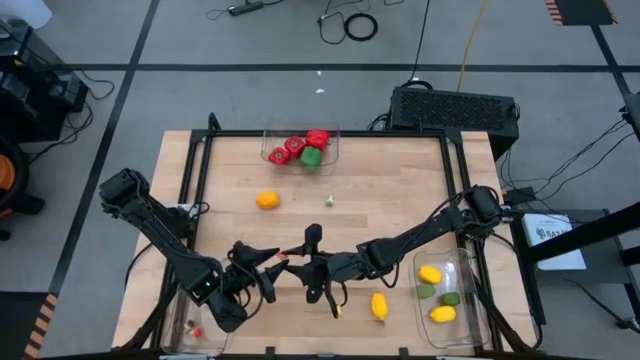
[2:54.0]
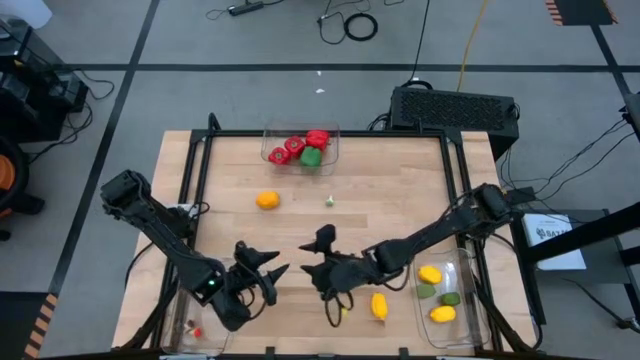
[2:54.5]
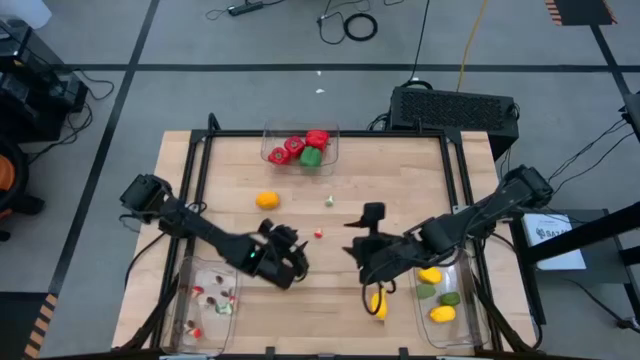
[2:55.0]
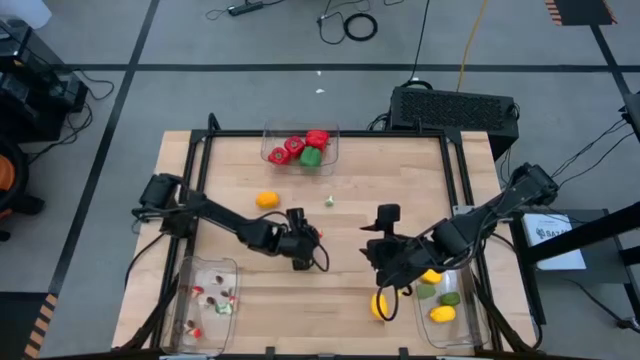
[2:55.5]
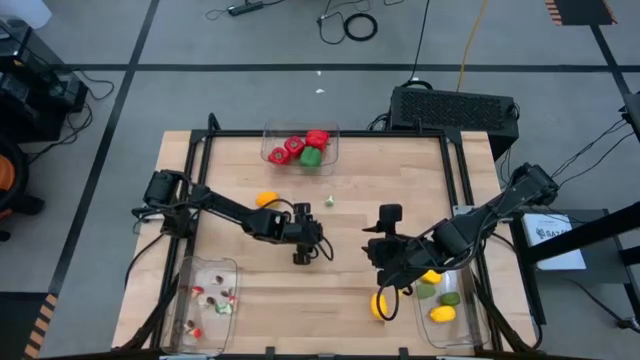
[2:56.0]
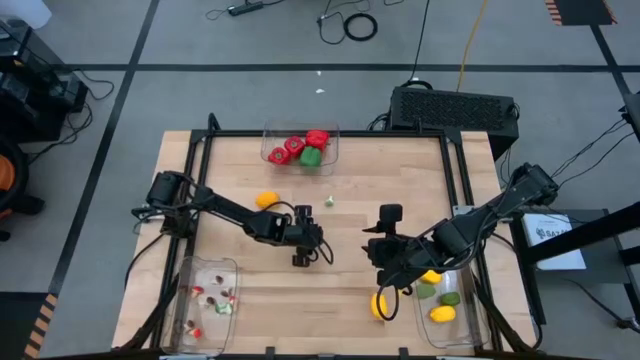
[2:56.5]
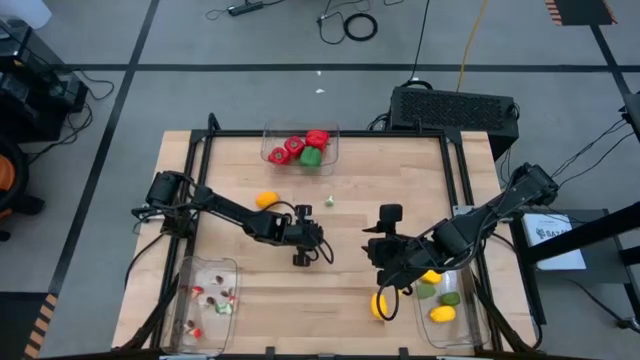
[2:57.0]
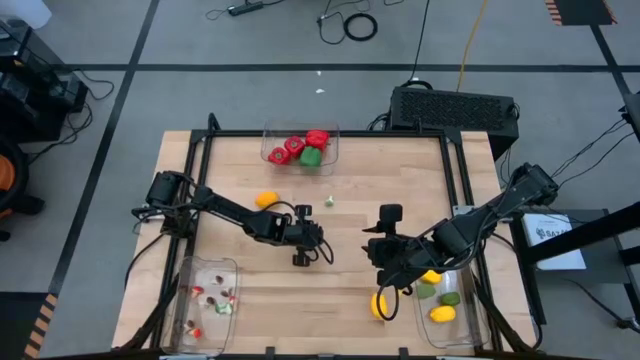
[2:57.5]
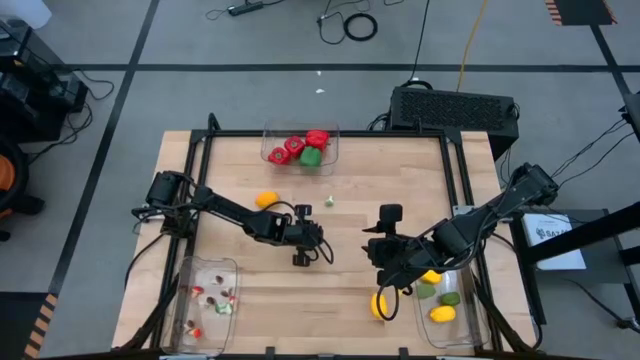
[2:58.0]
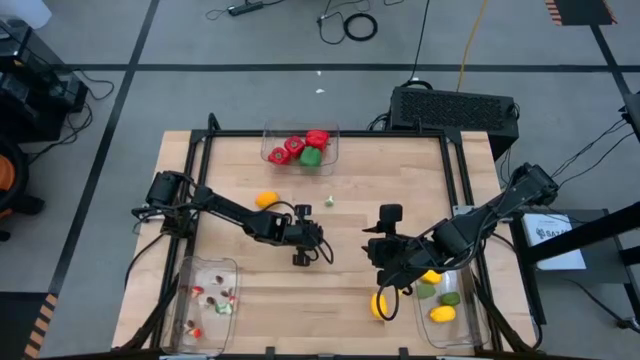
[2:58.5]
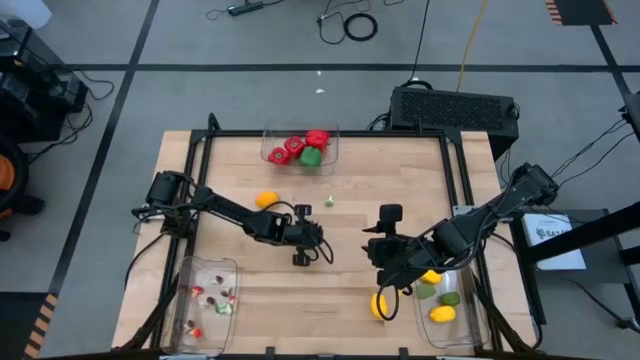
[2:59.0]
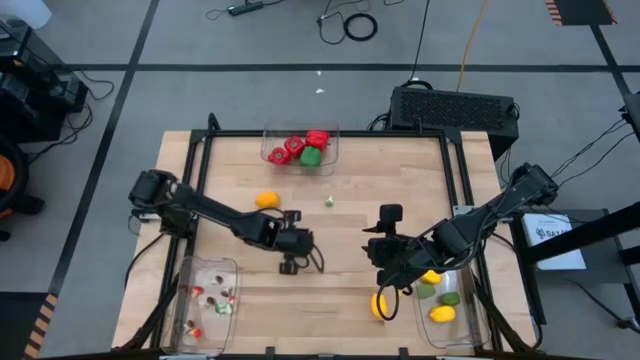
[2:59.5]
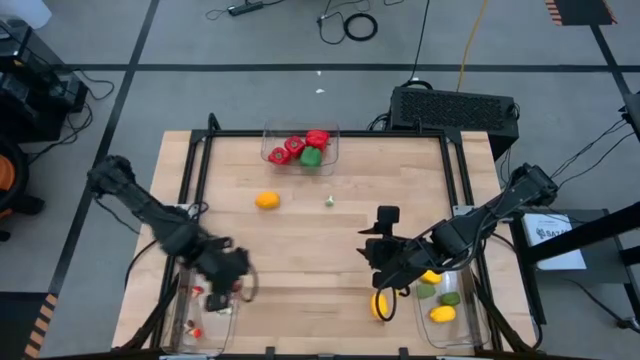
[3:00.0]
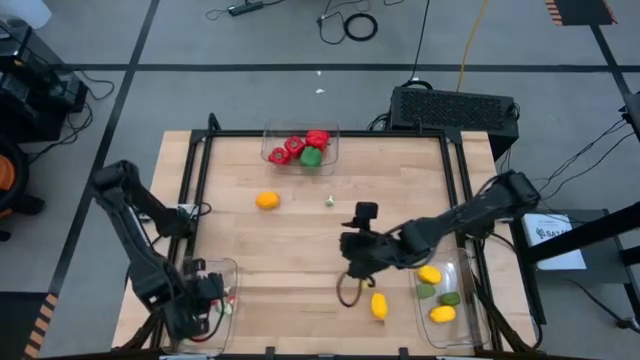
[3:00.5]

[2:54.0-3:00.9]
Task: Sort produce into baskets
Put the red mushroom into the bottom left transparent bin

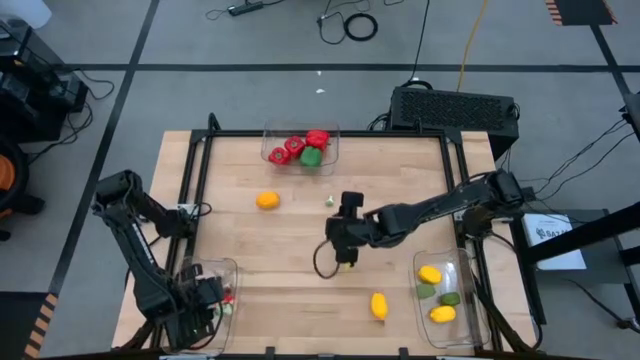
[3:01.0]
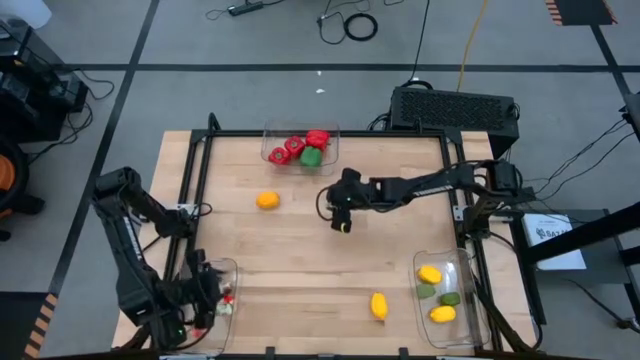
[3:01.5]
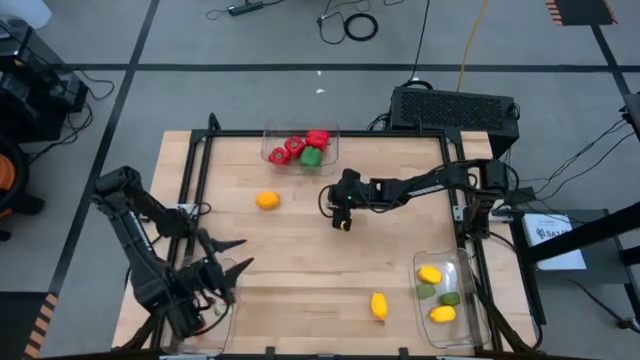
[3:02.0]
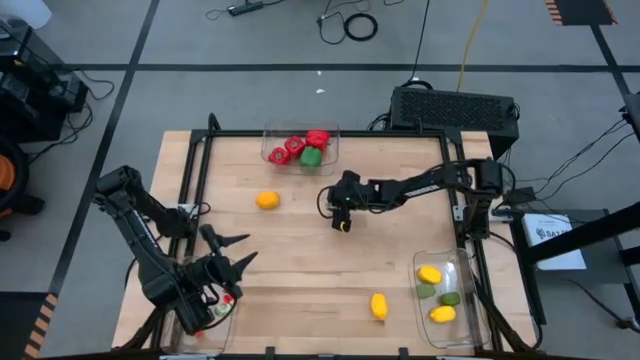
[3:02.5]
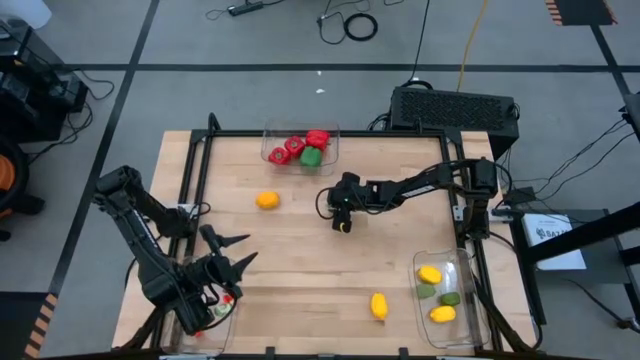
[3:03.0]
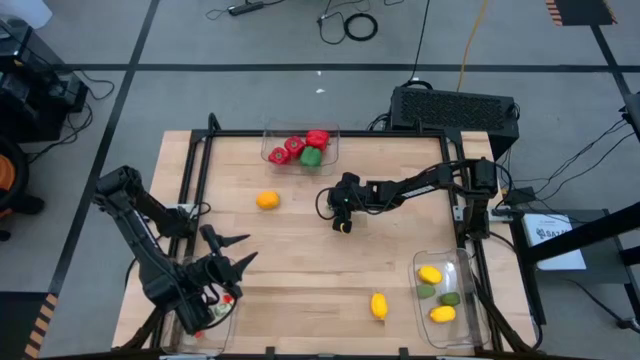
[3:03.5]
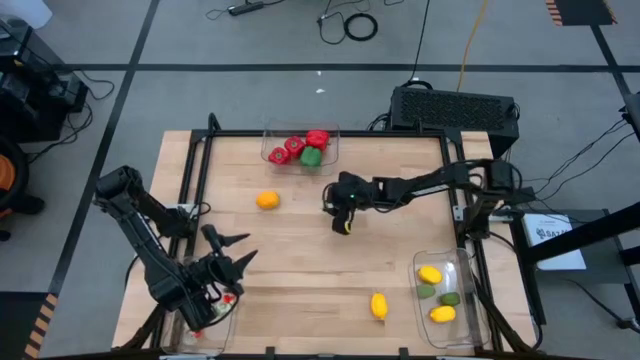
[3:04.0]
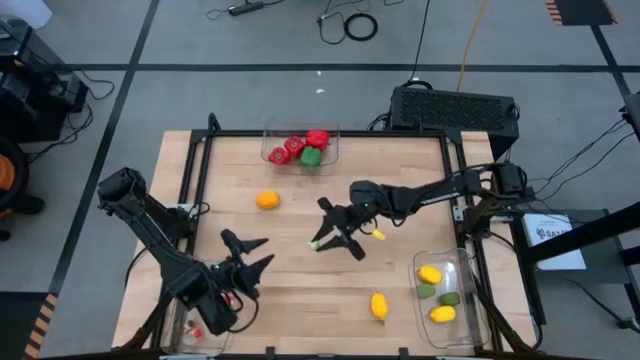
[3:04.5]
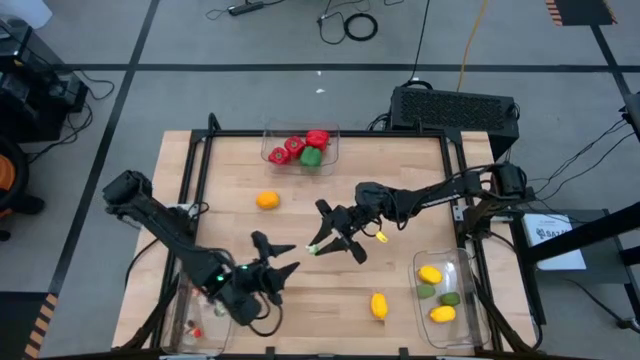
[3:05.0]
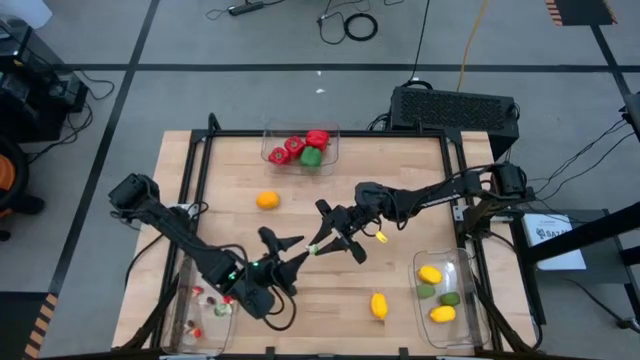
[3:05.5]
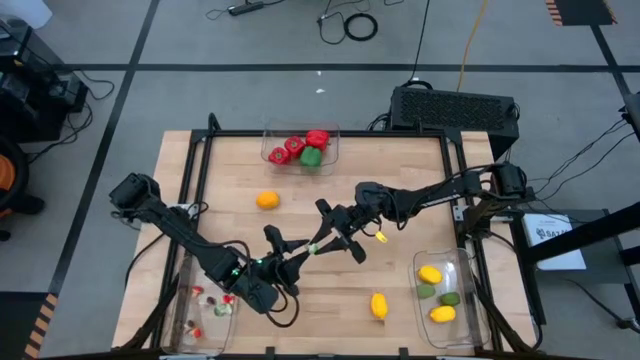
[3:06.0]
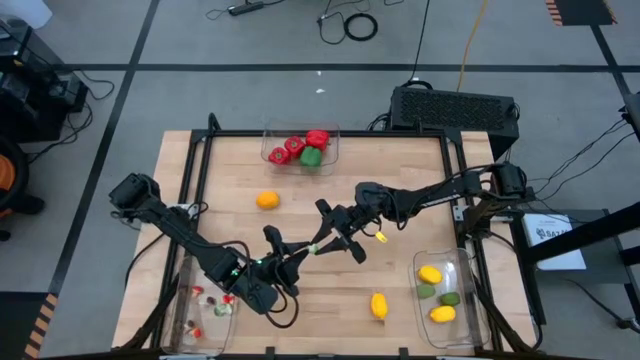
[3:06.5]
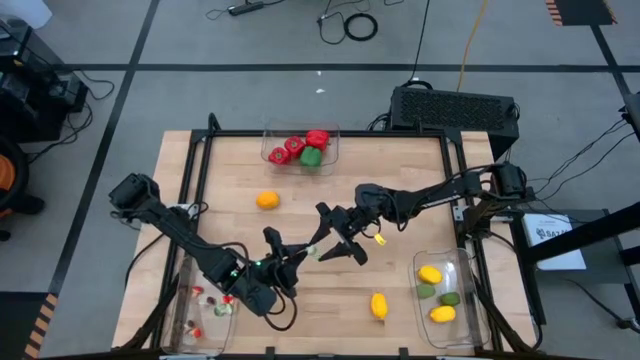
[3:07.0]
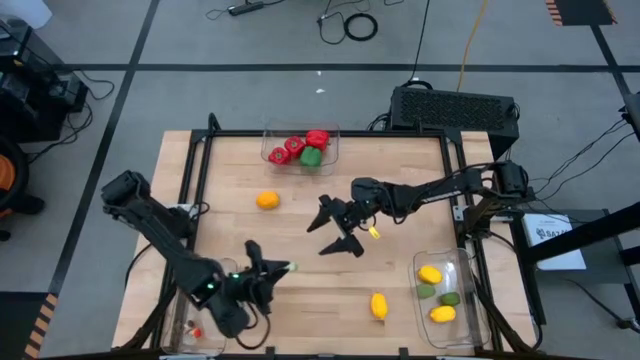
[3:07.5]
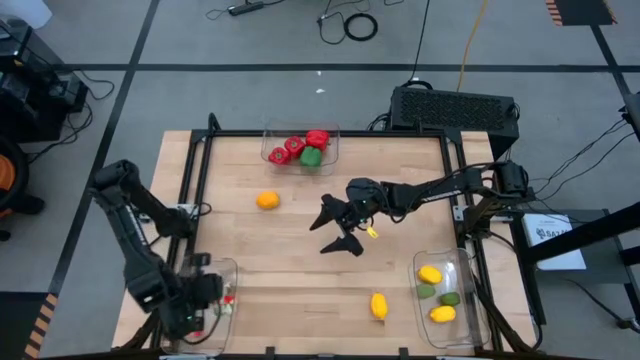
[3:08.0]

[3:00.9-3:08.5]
Put the green mushroom into the bottom left transparent bin

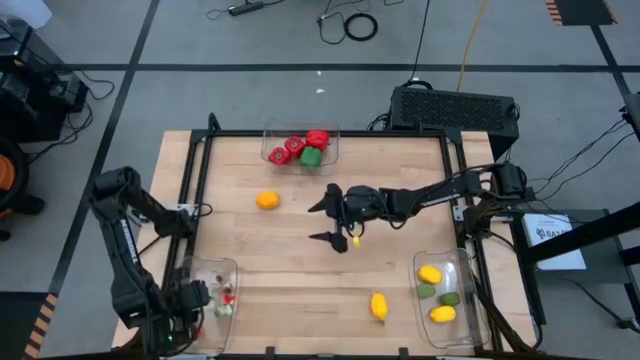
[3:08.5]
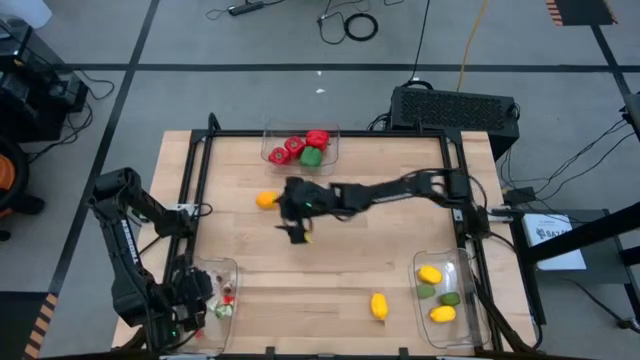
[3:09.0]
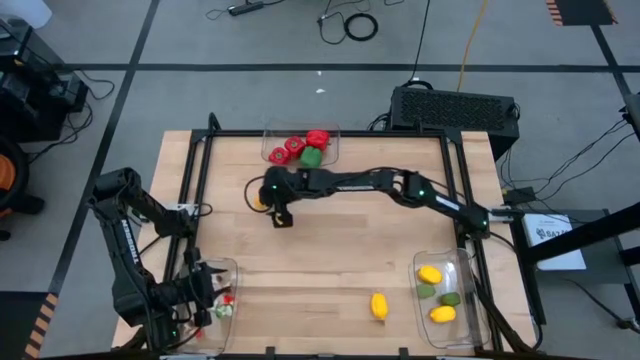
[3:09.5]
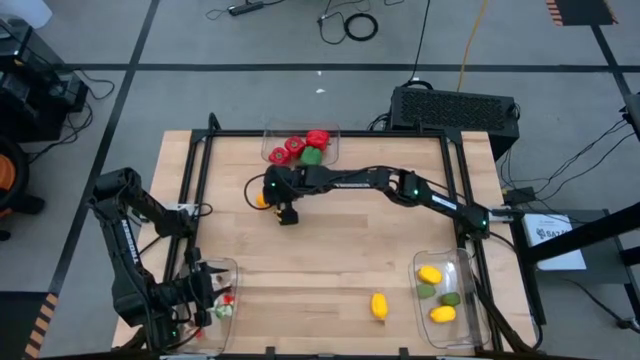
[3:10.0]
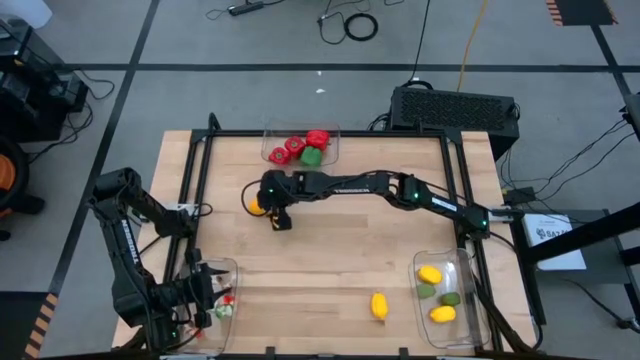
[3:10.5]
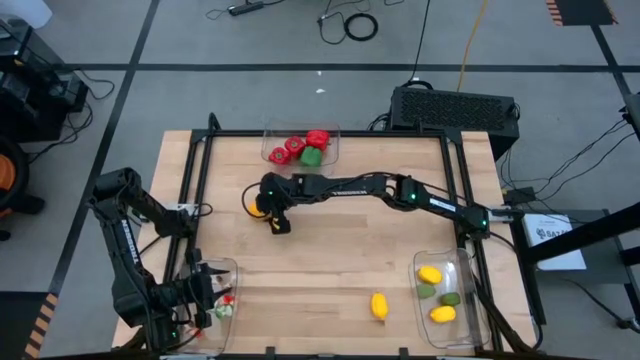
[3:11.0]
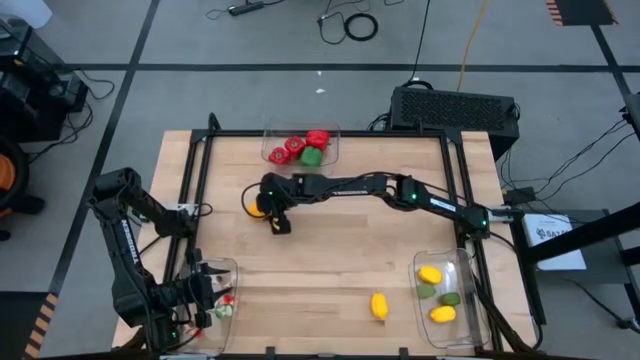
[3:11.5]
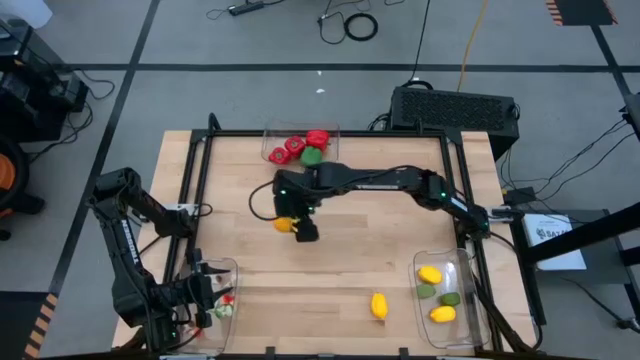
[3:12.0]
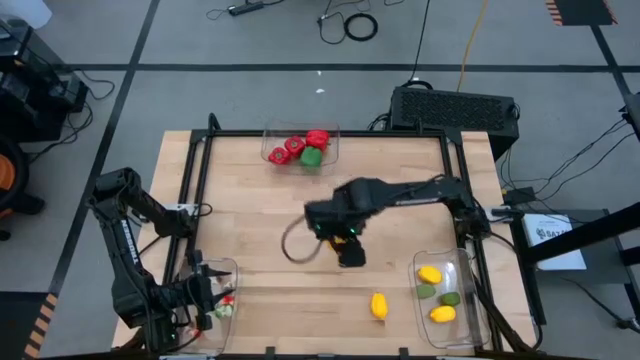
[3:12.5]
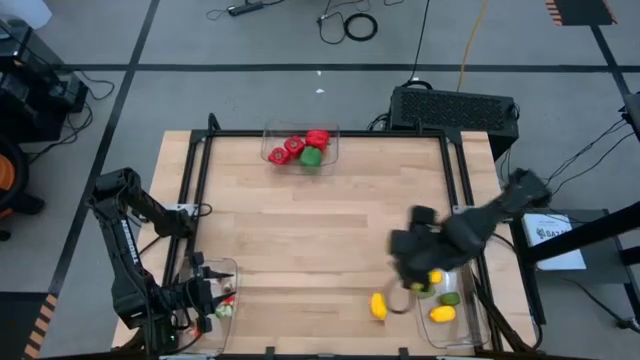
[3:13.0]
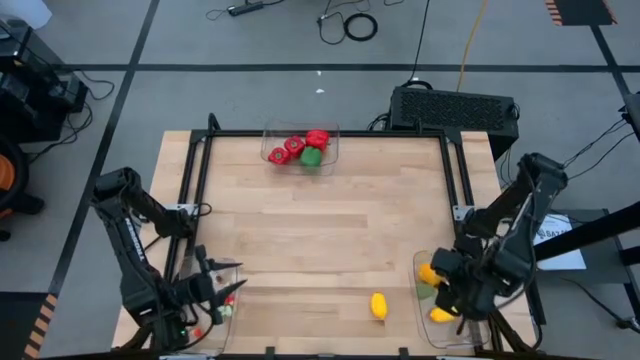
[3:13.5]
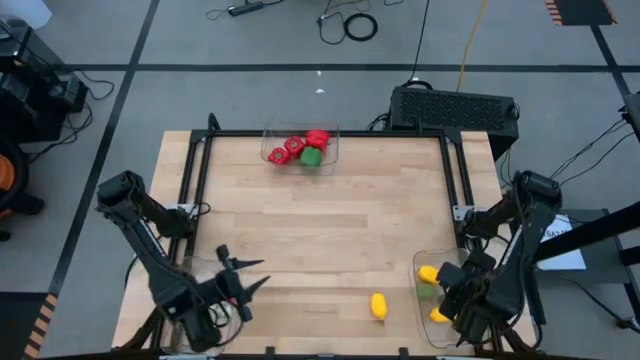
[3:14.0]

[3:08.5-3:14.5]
Put the yellow lemon into the bottom right transparent bin

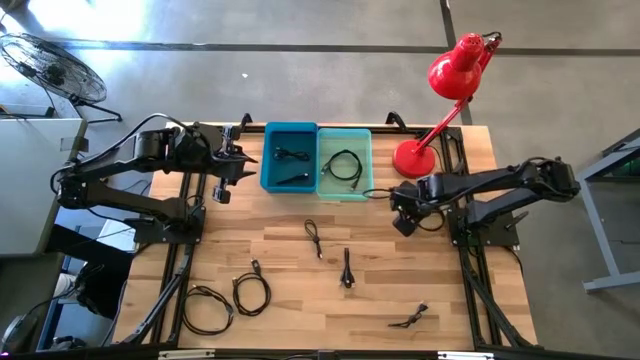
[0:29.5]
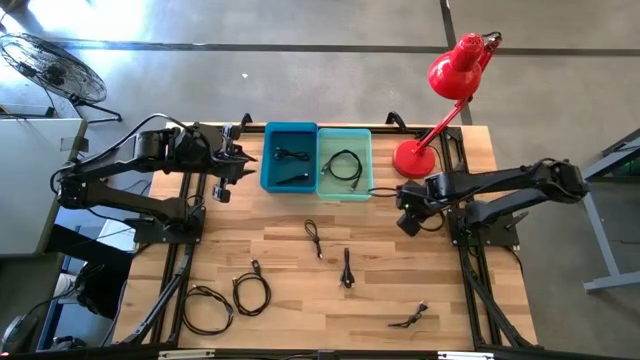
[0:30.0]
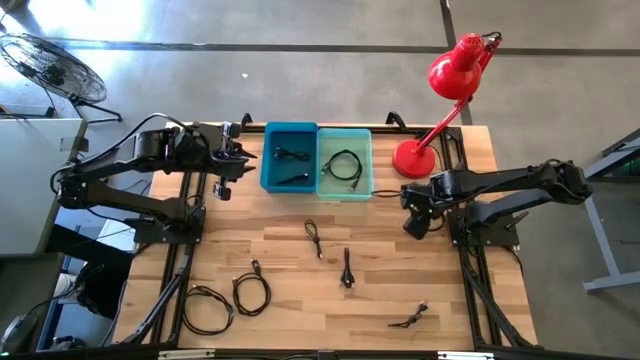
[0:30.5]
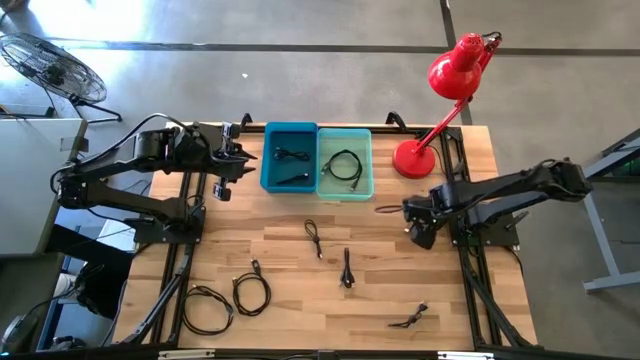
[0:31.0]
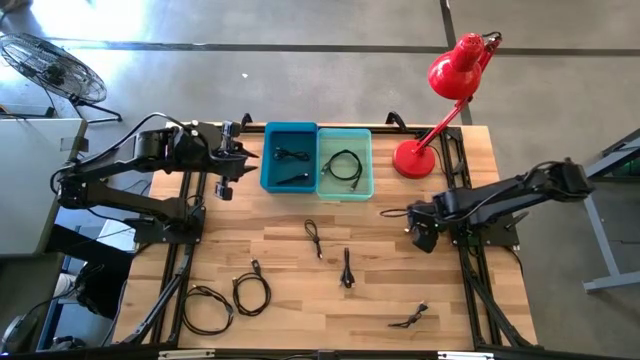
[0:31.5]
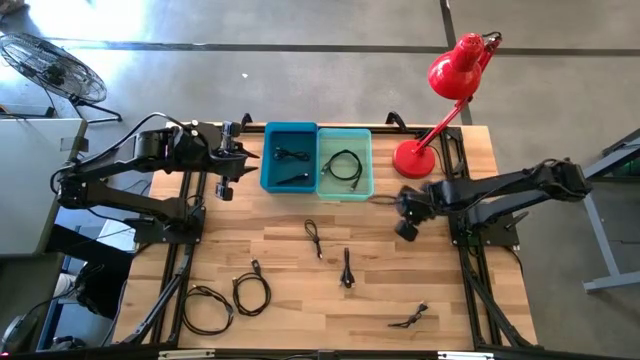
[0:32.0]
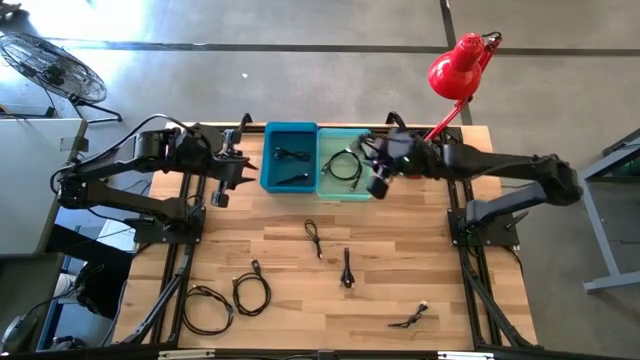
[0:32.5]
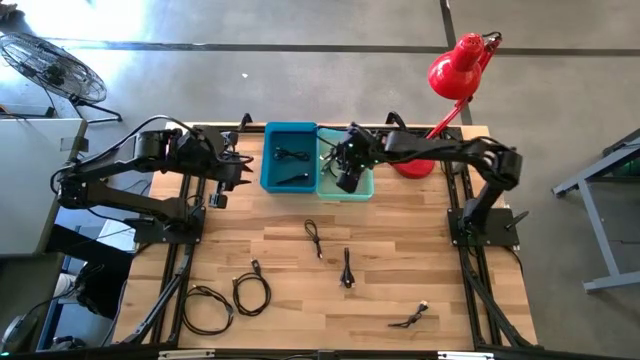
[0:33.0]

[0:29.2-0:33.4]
Task: Pick & Place USB Port
Put the black USB cable into the green bin
